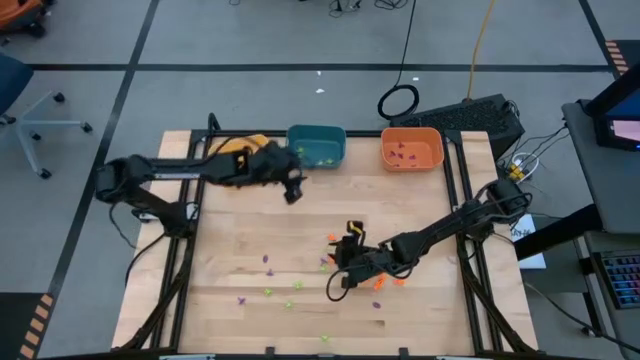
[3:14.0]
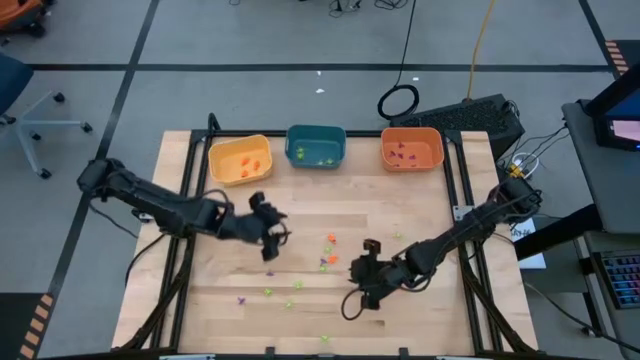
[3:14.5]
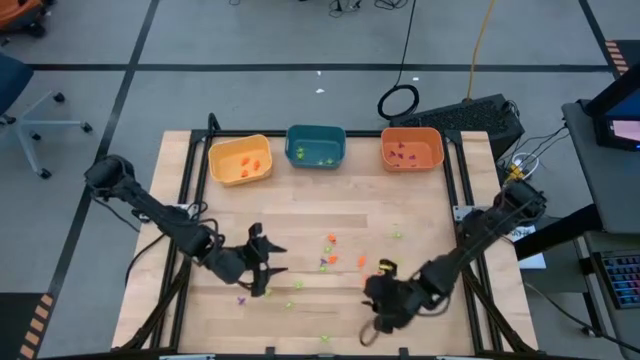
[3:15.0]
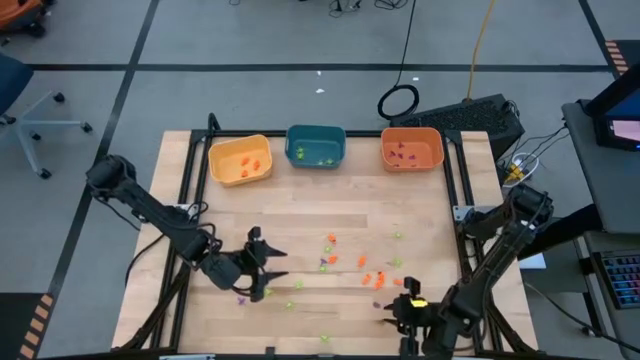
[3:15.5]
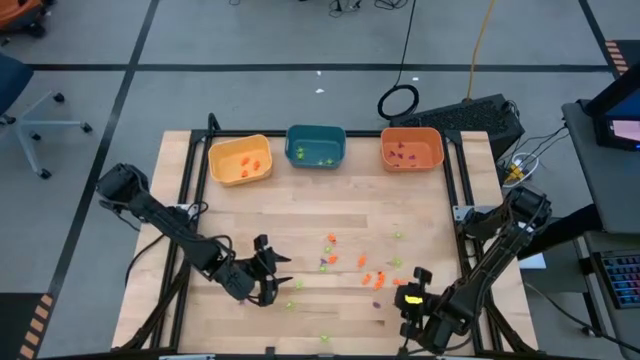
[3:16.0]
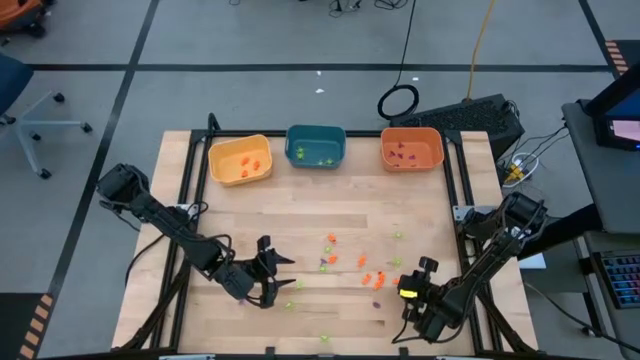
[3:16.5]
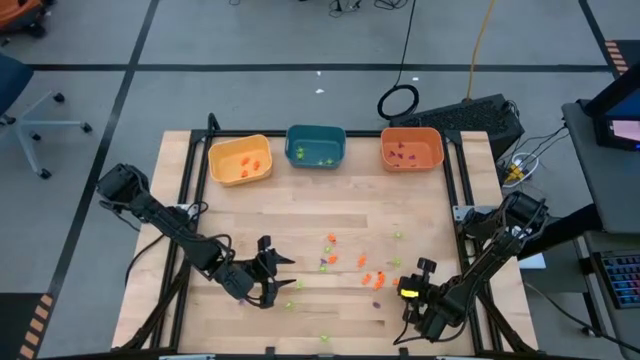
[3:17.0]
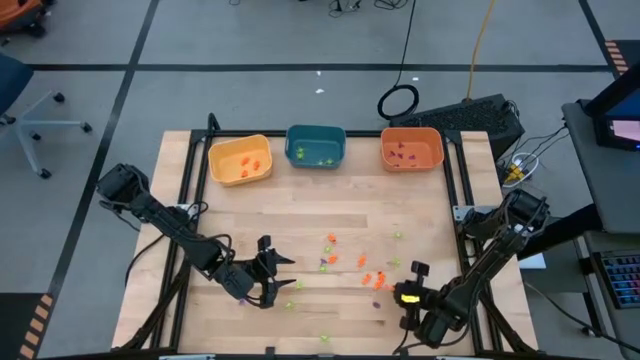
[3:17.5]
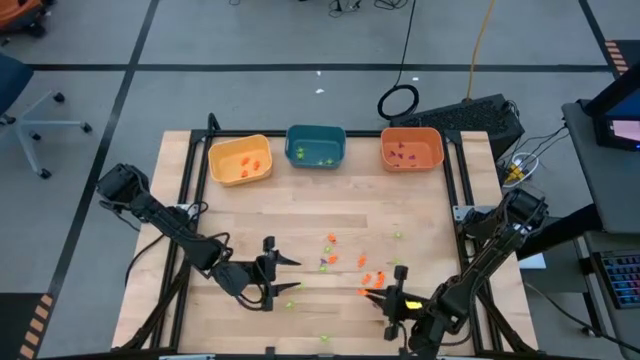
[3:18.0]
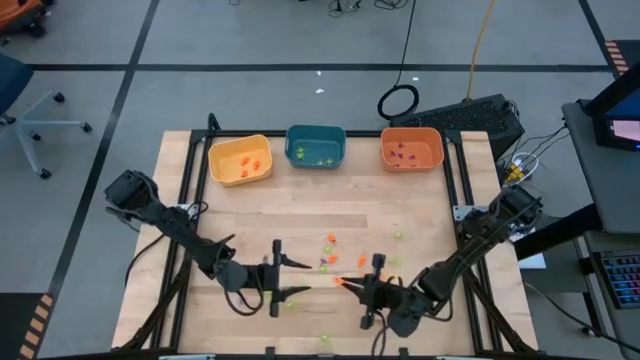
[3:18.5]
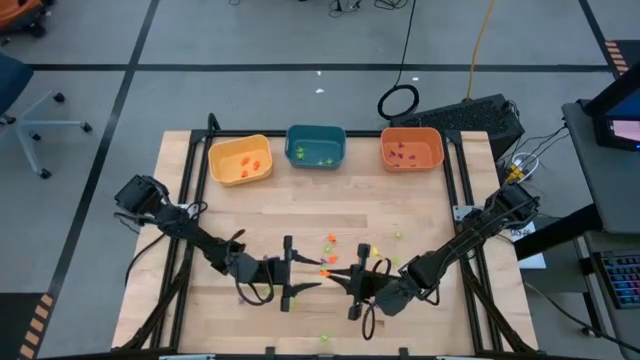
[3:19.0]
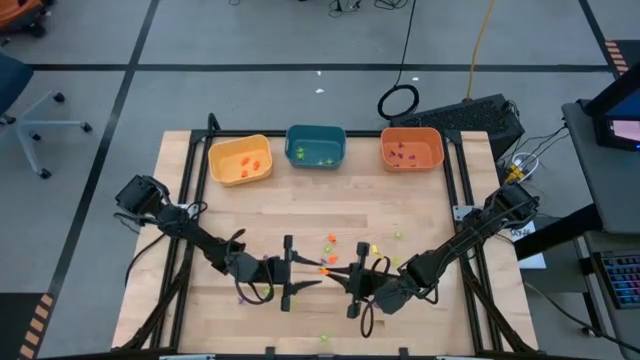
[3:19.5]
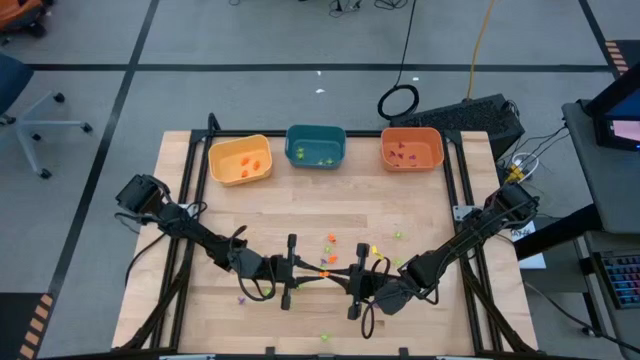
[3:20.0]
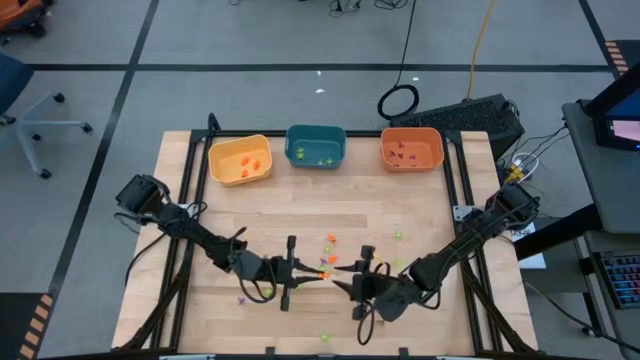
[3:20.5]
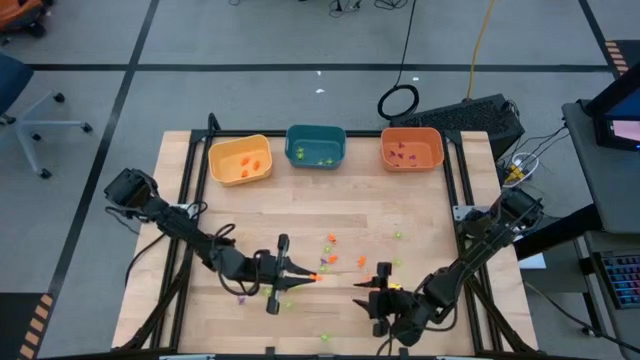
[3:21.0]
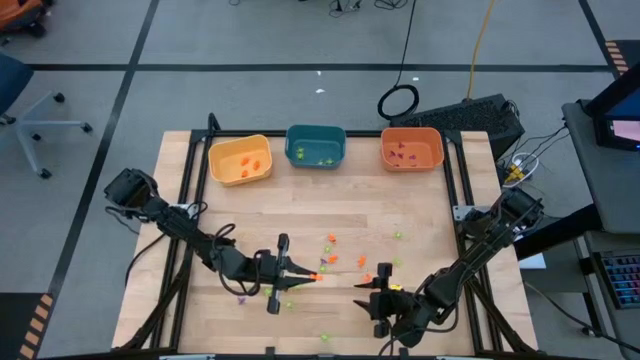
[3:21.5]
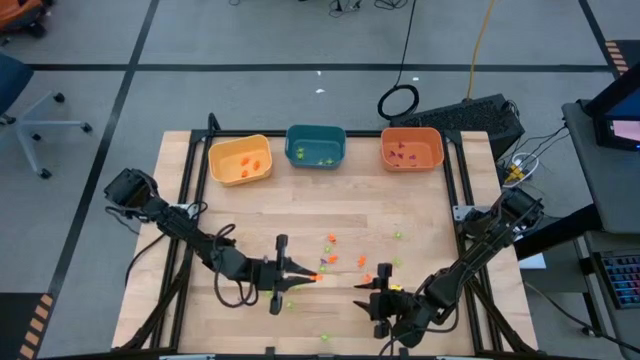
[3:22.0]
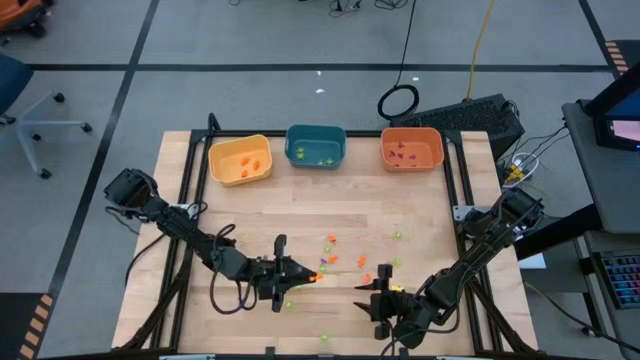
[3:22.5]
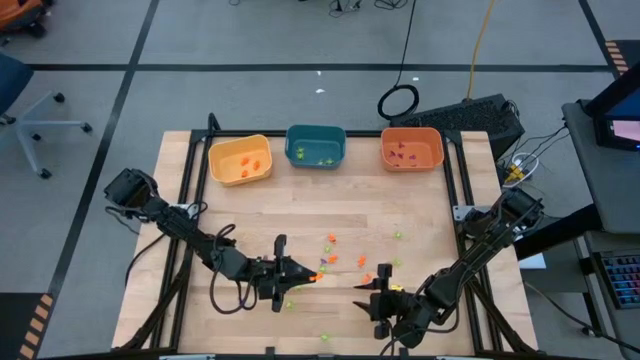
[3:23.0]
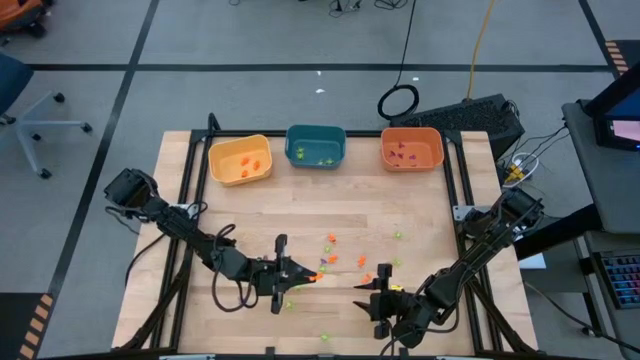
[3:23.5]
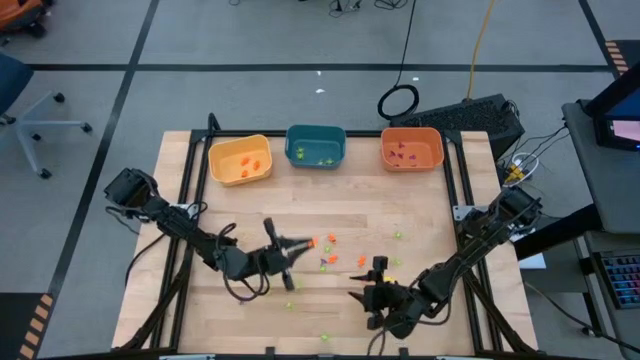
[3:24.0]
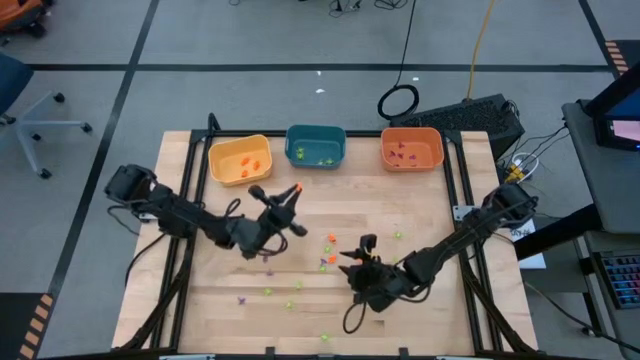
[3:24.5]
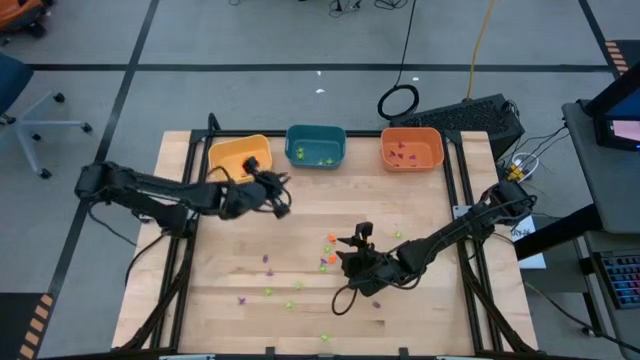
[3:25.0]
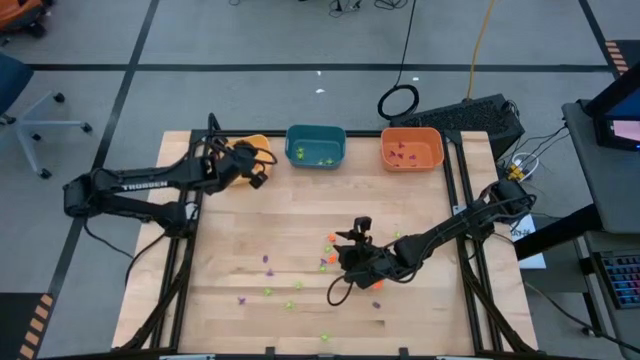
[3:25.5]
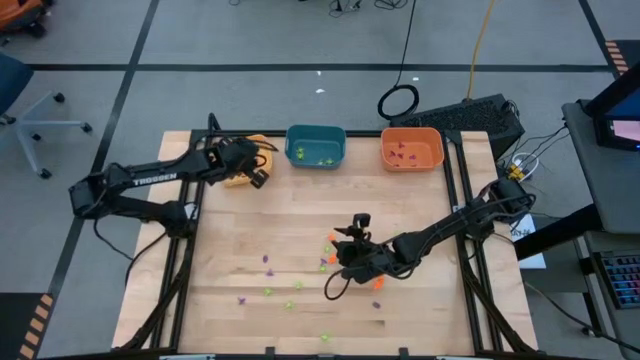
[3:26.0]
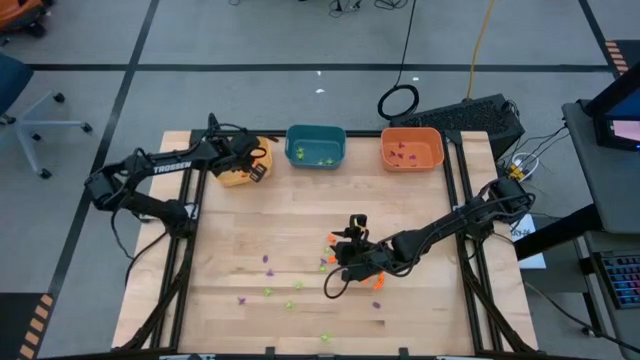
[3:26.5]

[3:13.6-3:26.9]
Task: Sort Halloween decoration
Put the orange skeleton toy into the yellow bin

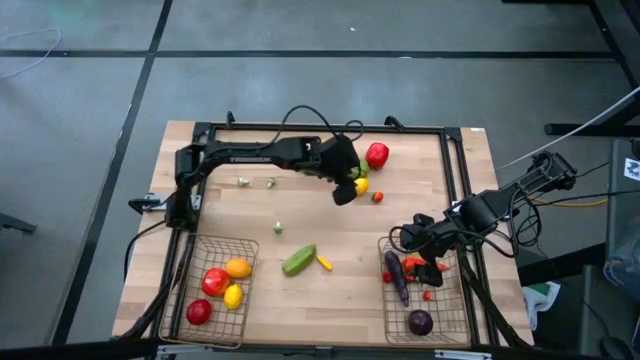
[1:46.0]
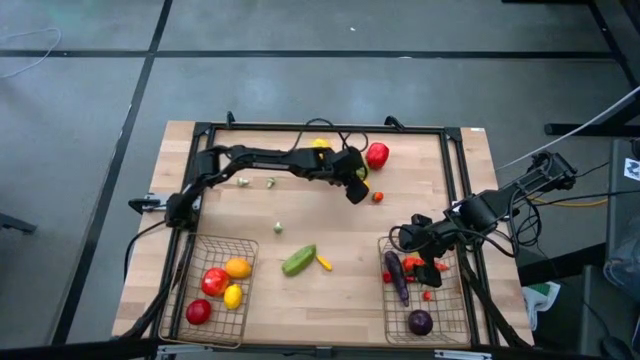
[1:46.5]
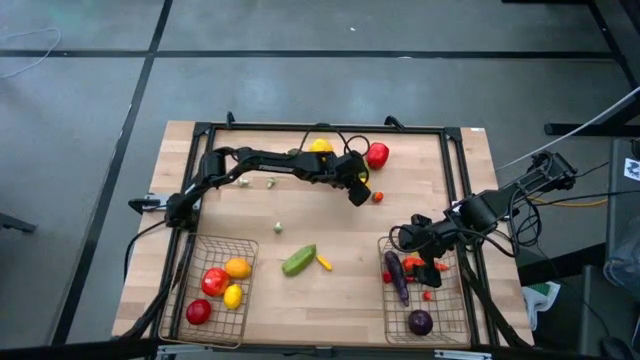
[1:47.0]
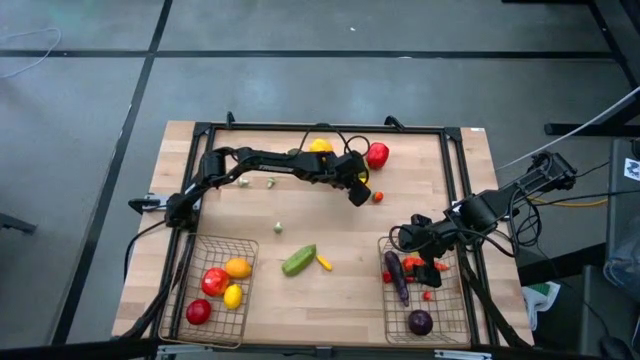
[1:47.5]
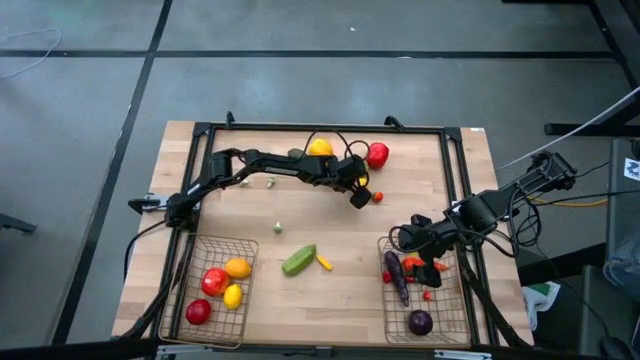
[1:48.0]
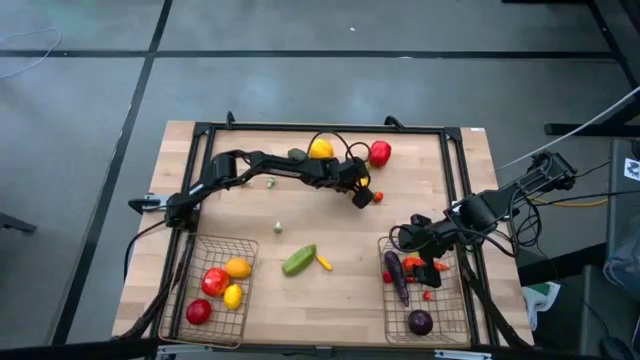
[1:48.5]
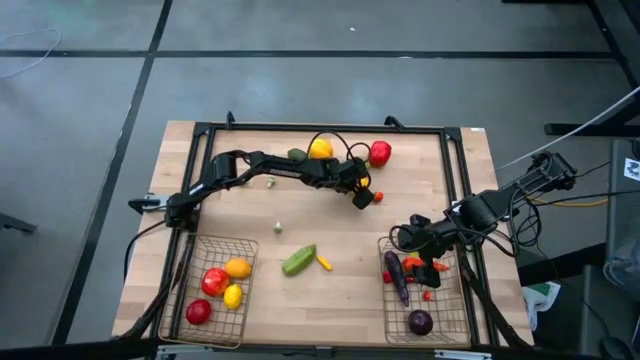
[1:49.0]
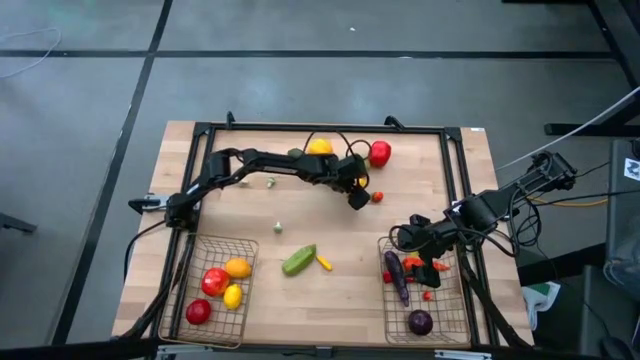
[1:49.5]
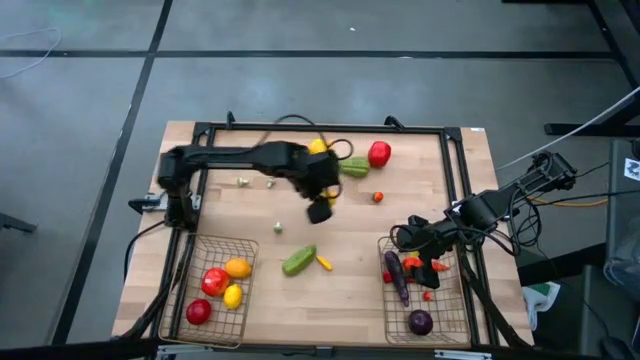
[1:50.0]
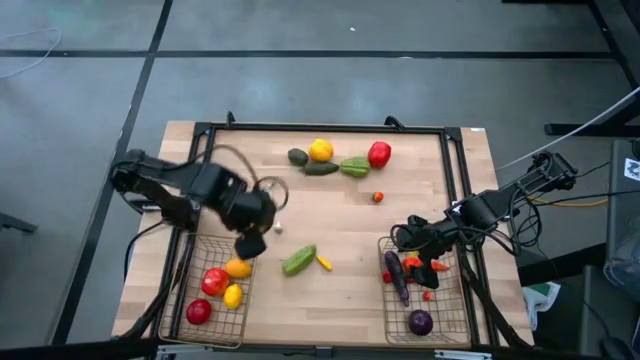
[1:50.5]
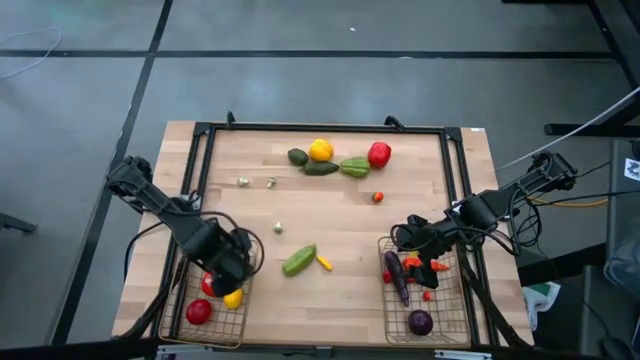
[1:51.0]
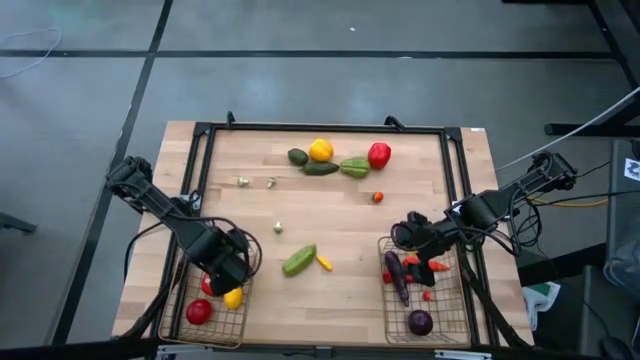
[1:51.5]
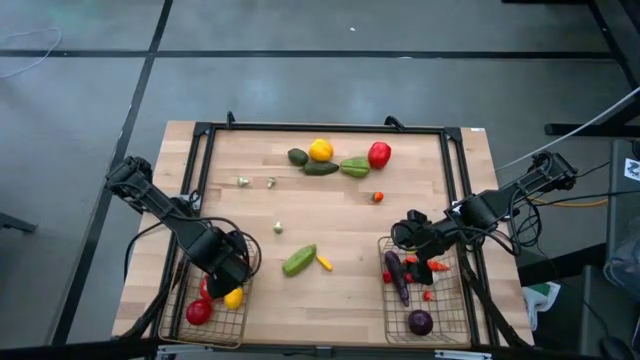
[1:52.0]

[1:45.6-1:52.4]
Task: Sort produce into baskets
Put the yellow lemon into the left wire basket

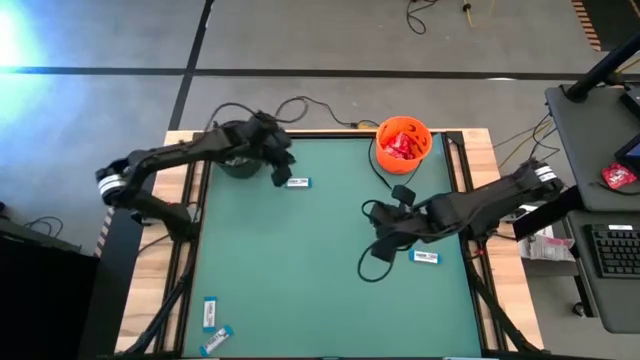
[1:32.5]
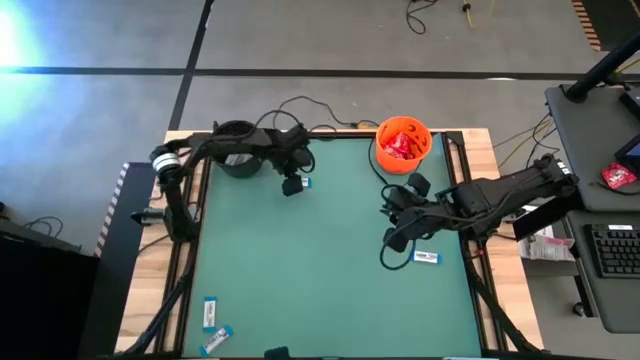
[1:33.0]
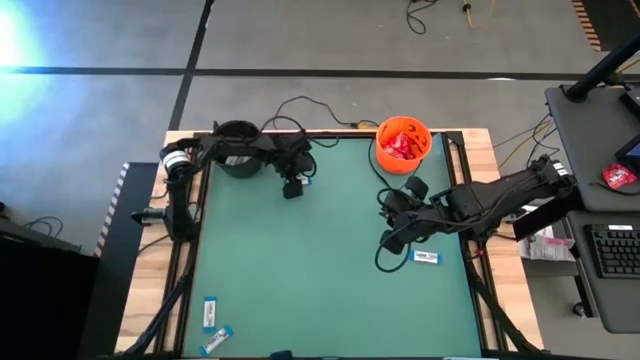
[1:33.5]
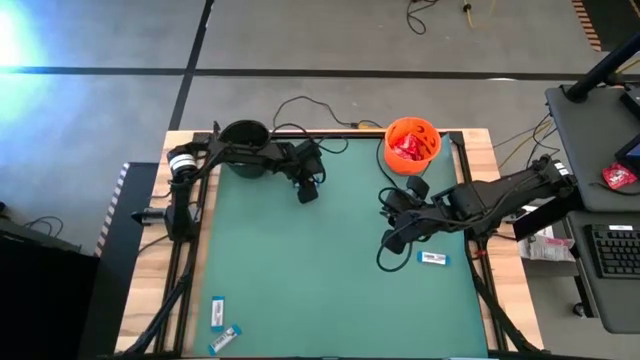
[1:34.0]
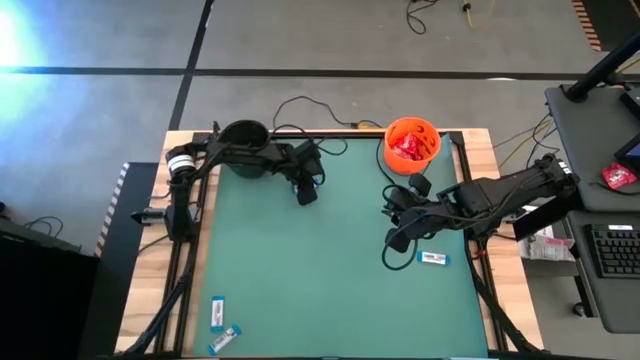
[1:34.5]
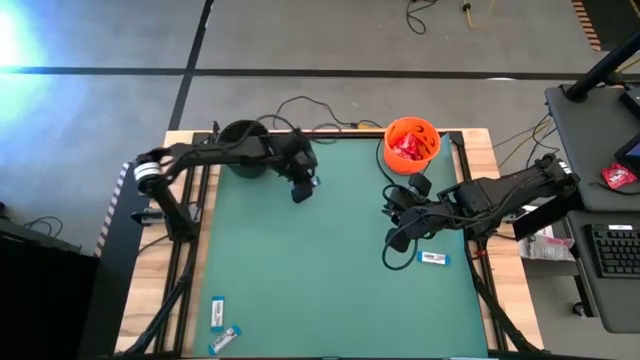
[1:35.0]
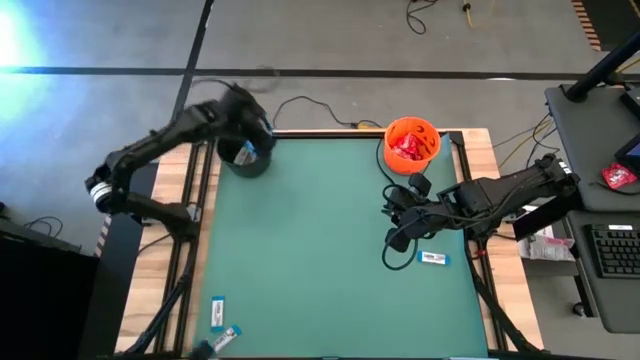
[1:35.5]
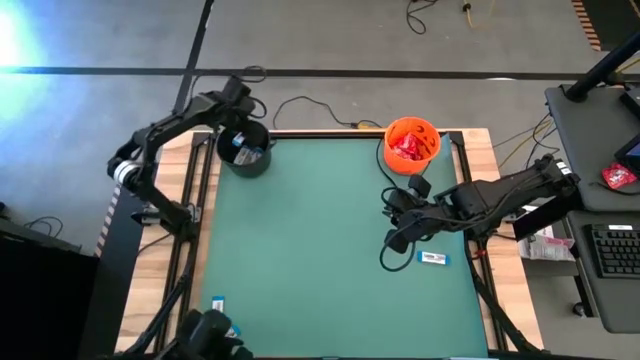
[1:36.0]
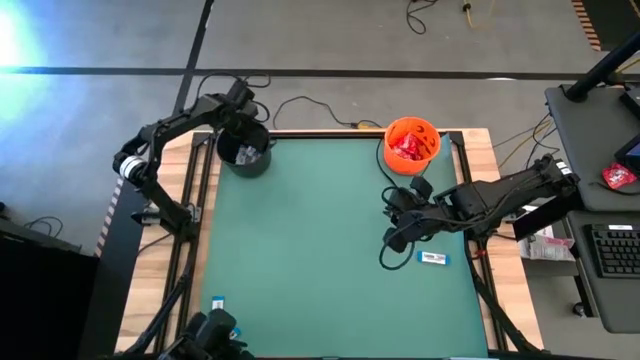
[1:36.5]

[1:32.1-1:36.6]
Task: Sort candy by brand, put in halloween buckets
Put the white candy into the black bucket
